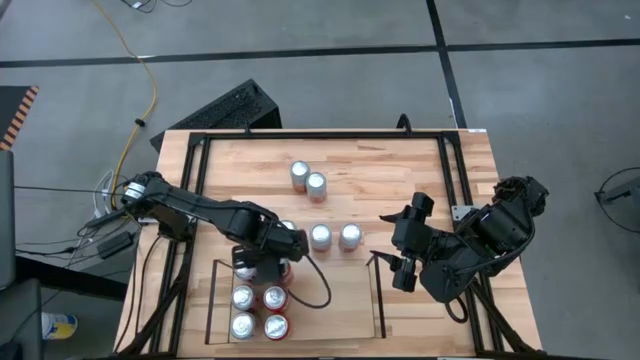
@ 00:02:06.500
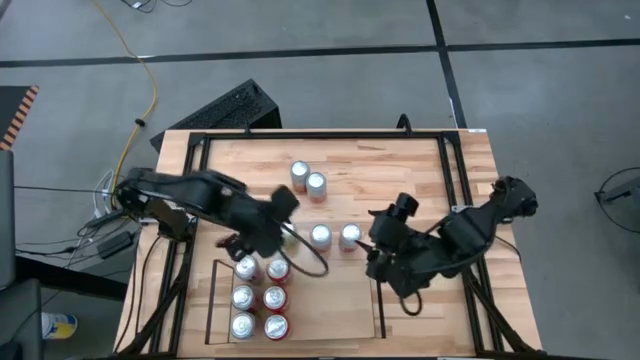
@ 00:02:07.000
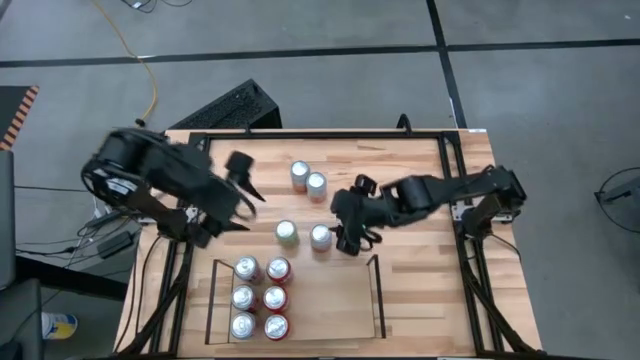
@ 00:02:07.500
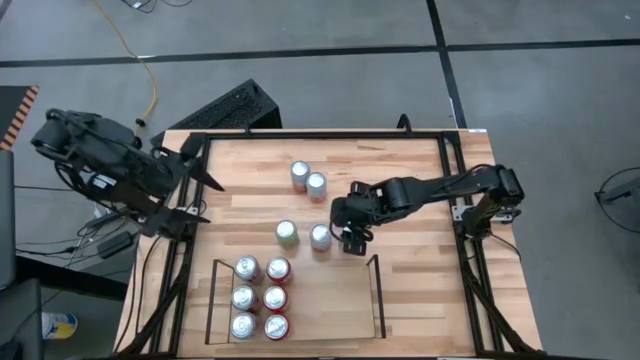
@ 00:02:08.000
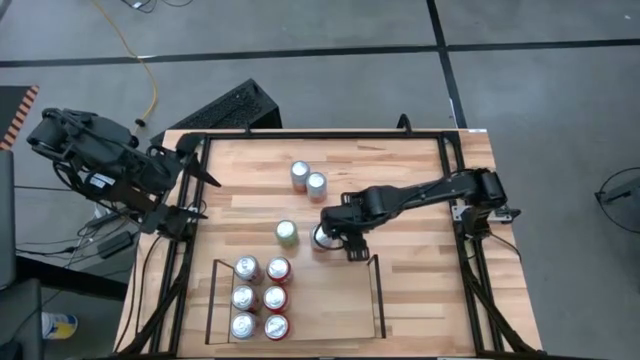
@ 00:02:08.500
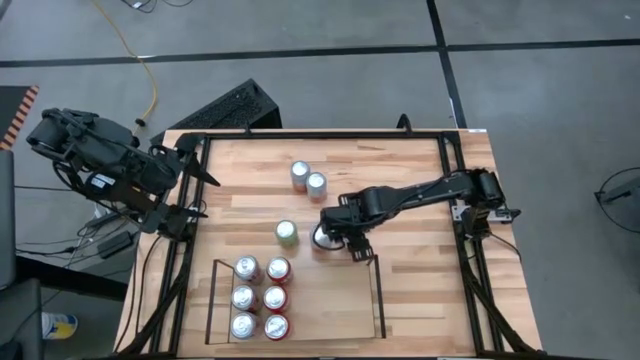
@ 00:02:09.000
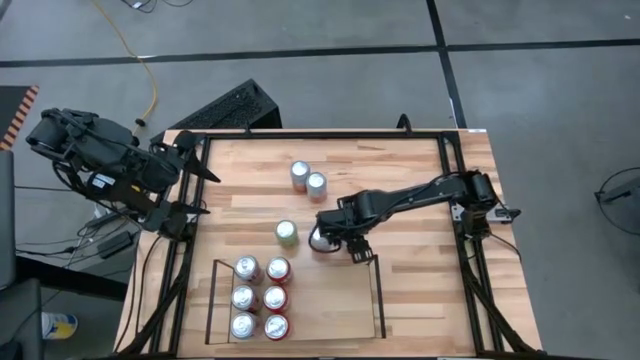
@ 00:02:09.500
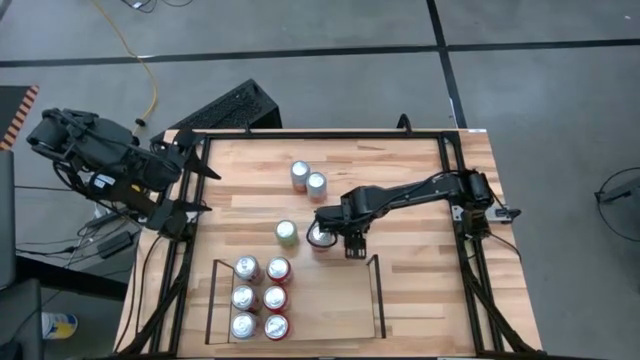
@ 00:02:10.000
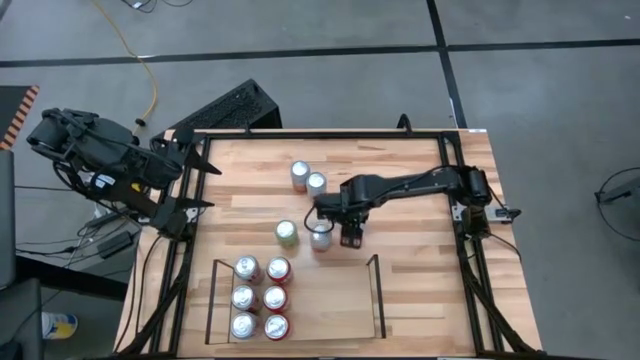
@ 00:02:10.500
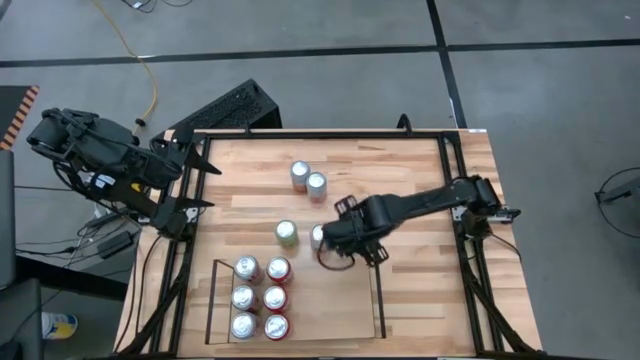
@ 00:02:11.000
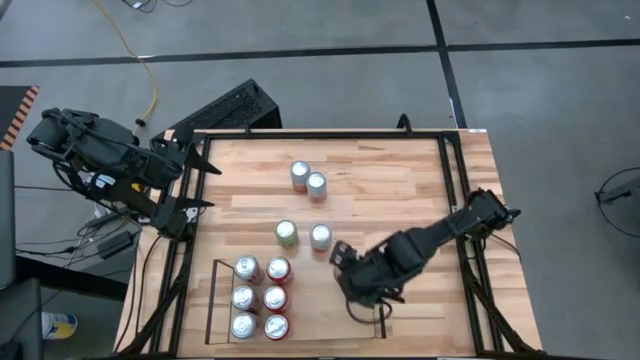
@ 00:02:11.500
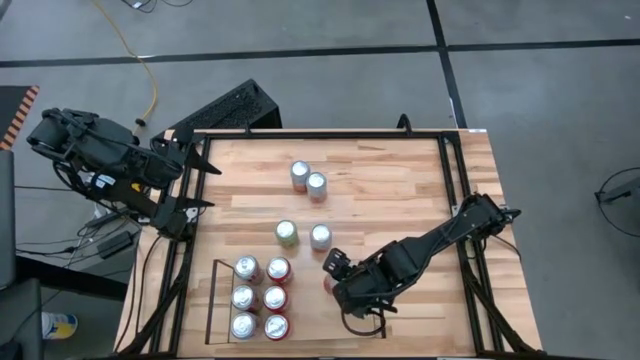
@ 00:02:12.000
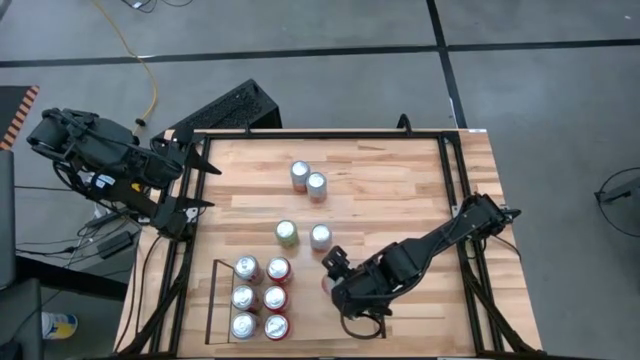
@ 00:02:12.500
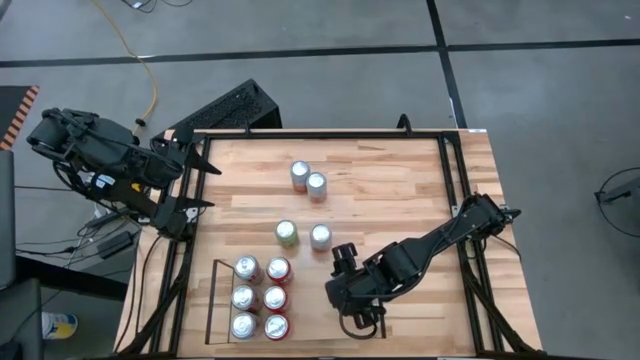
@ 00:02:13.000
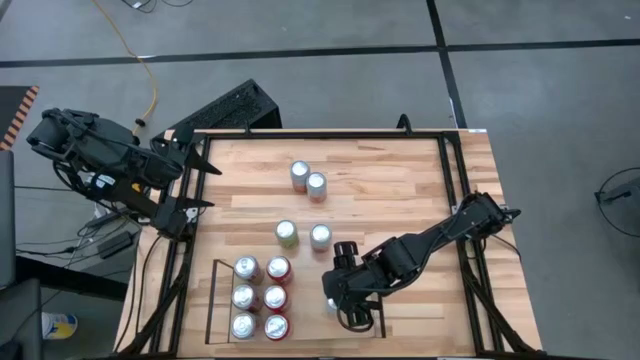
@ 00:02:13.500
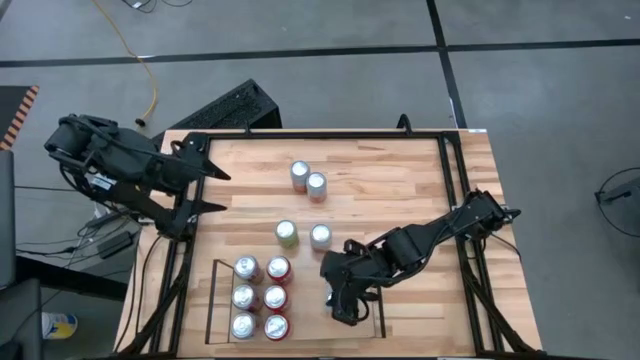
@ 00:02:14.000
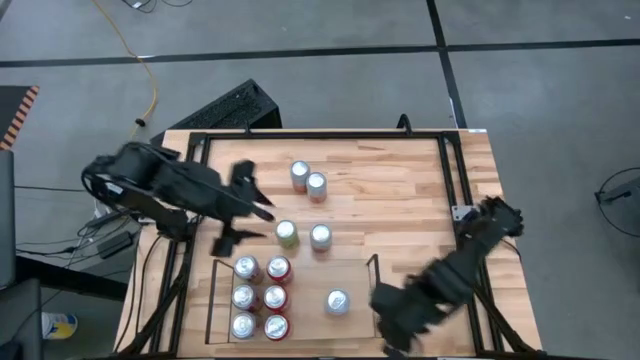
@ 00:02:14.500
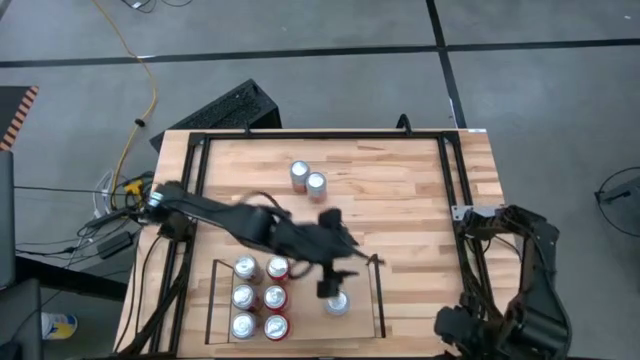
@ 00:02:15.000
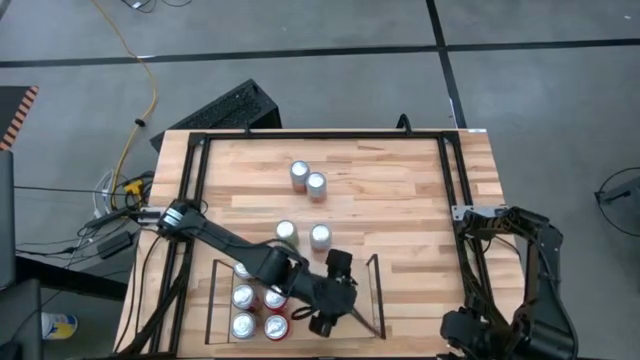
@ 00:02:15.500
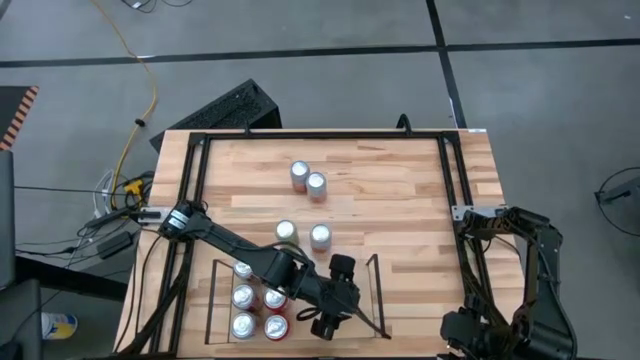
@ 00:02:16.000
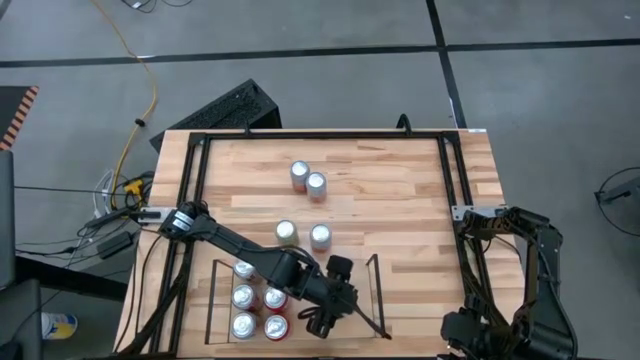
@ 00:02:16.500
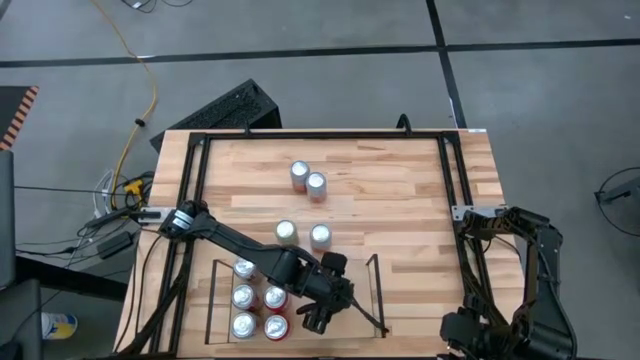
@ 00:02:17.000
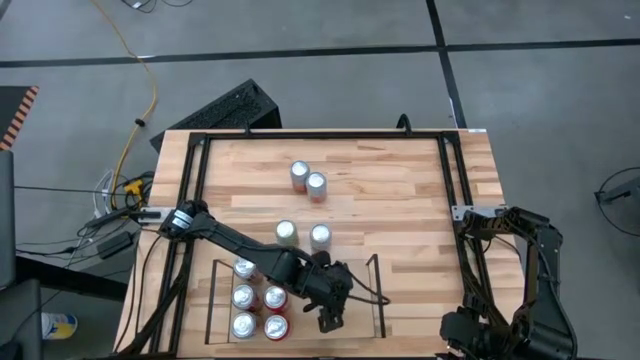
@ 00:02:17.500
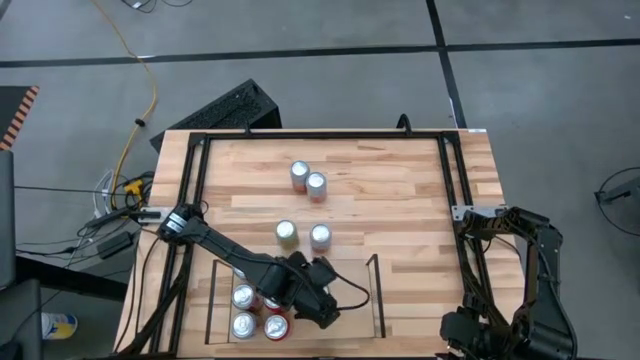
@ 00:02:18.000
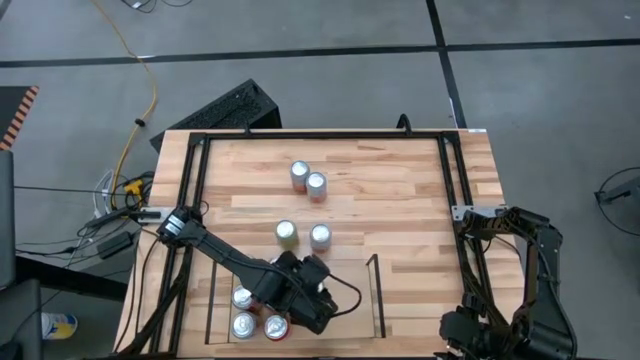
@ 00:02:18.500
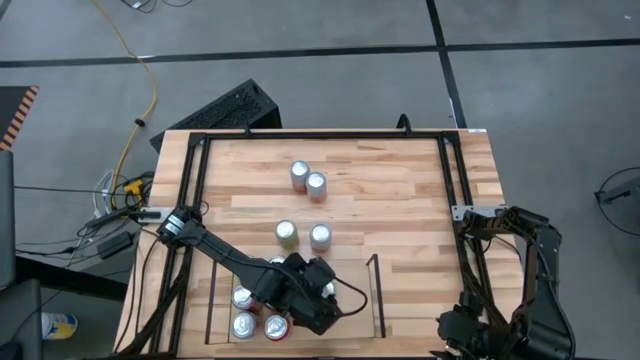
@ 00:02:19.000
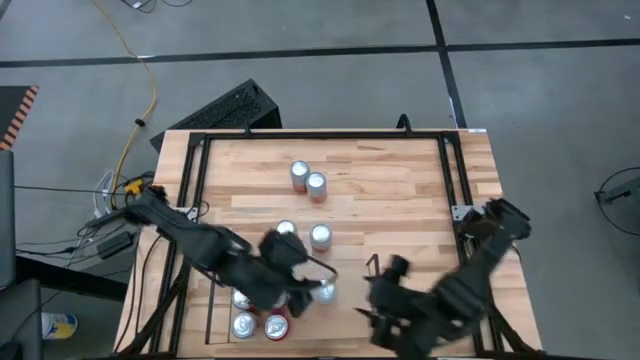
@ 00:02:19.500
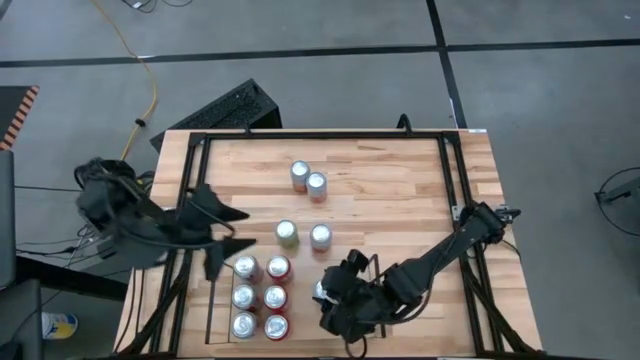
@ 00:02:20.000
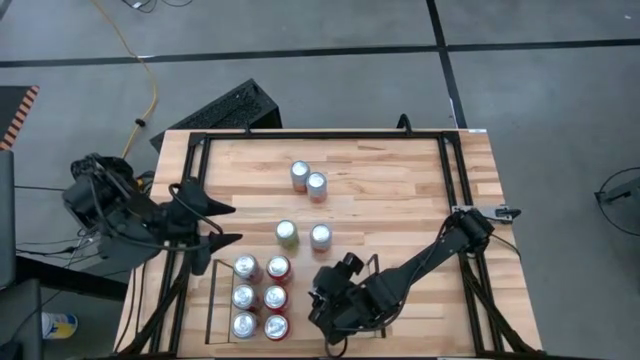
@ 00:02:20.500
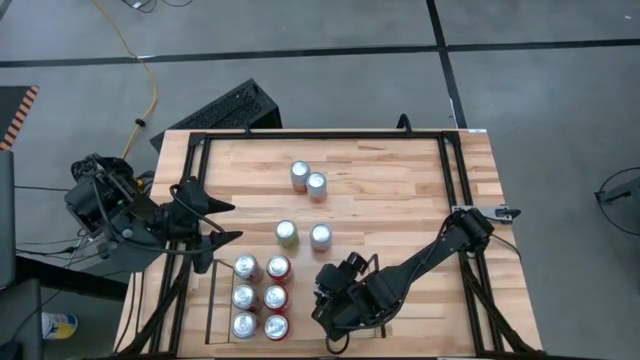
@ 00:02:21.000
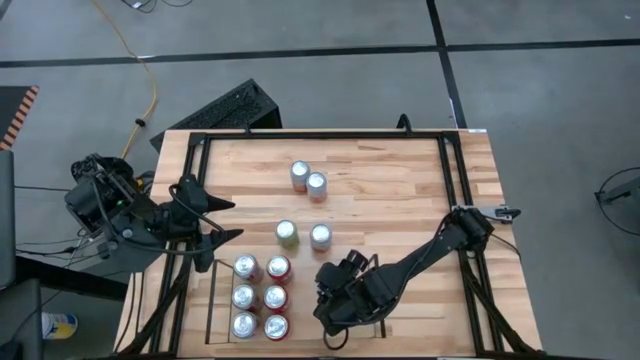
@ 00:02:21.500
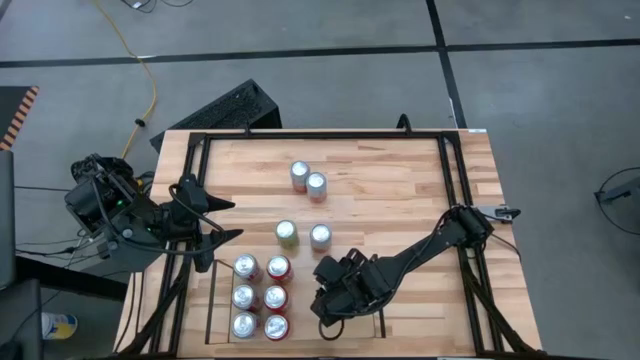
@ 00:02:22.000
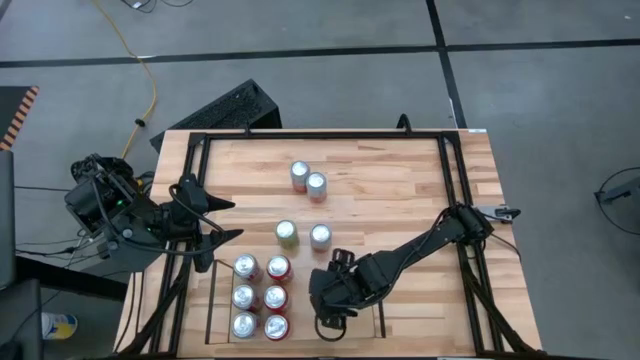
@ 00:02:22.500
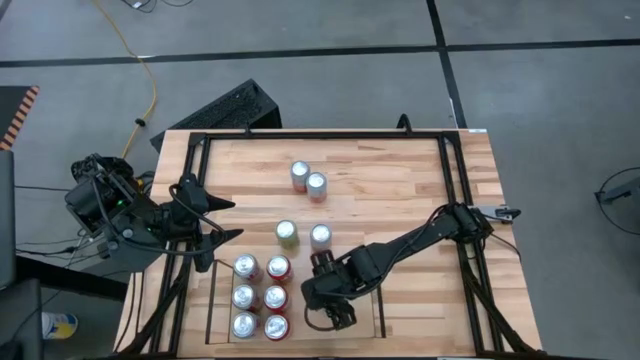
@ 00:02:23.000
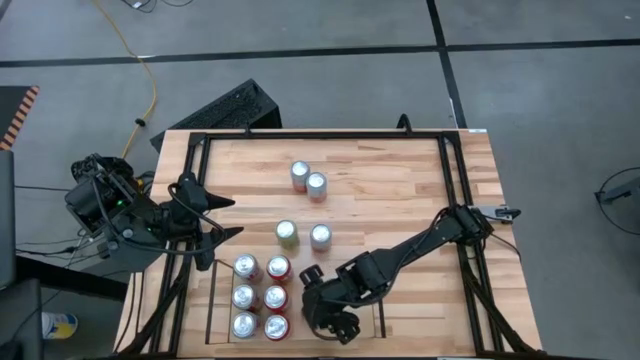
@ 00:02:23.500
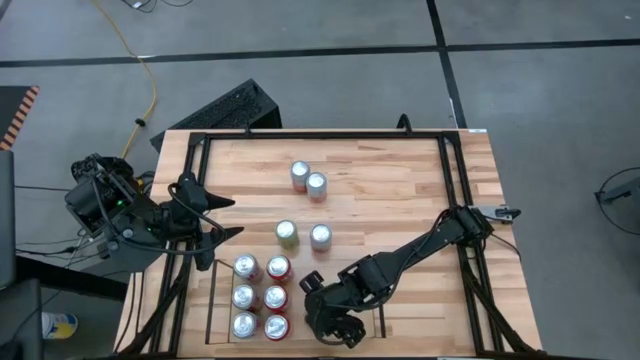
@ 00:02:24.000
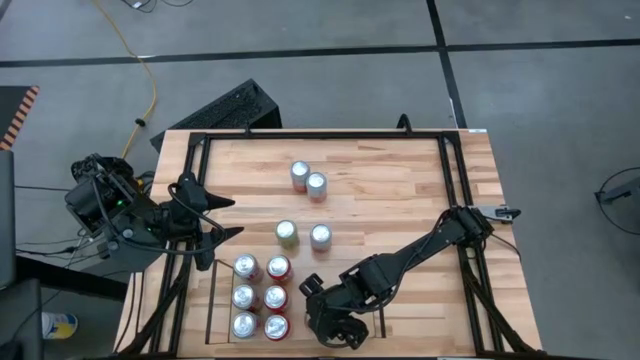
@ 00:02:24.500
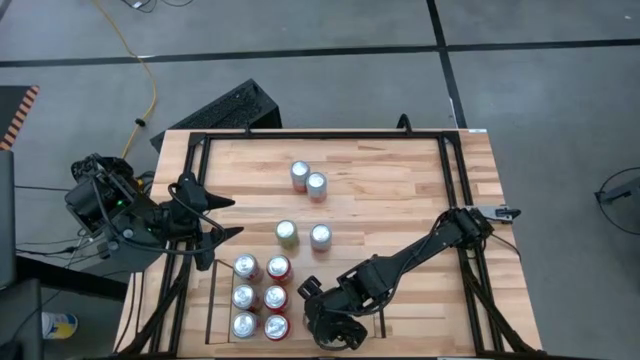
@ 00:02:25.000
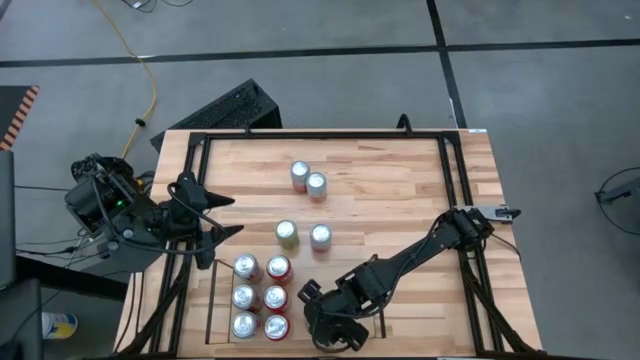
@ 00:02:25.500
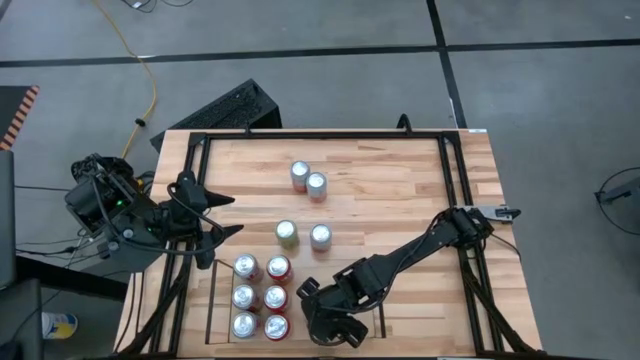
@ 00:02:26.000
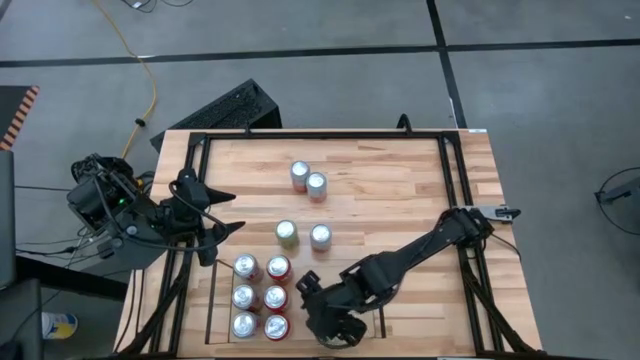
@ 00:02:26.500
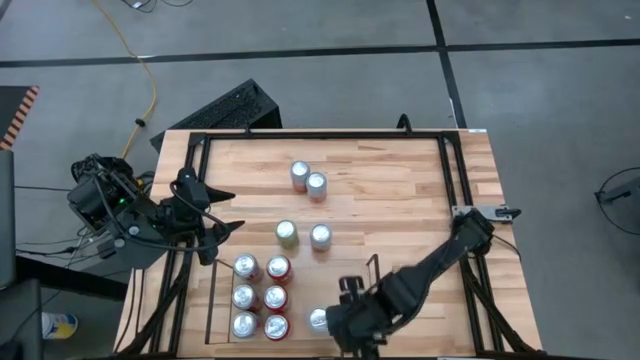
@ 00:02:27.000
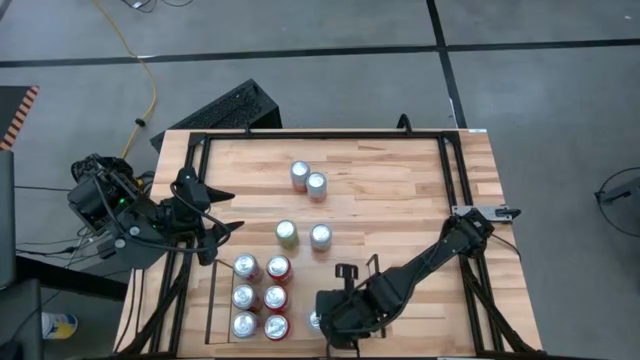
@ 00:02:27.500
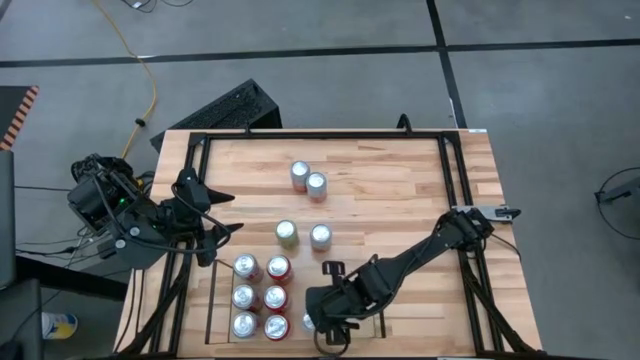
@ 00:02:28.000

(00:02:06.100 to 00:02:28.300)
Task: Place canned beverage on shelf
Put the white soda can on the shelf
